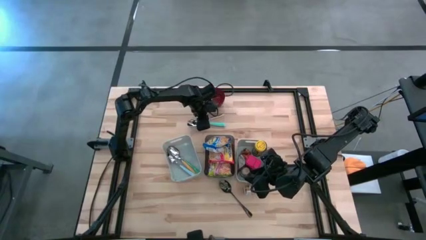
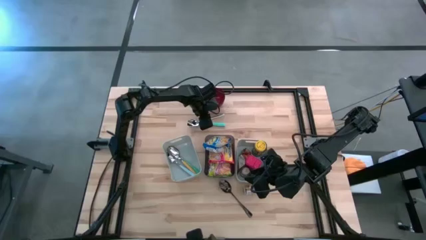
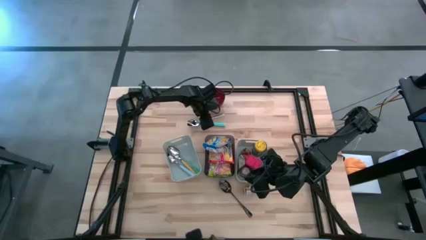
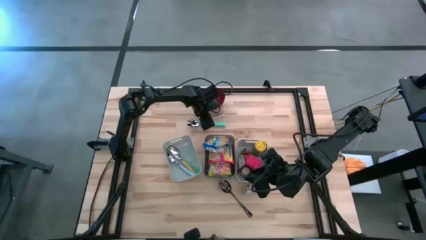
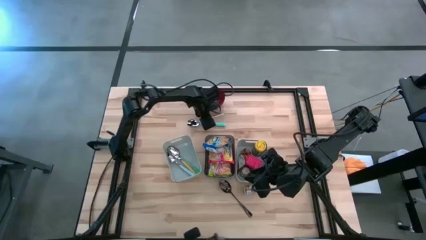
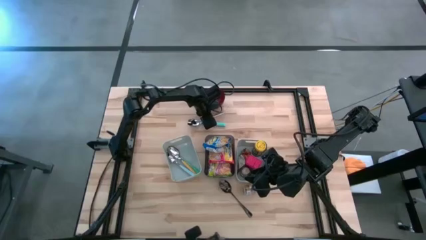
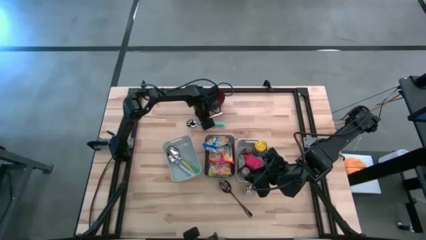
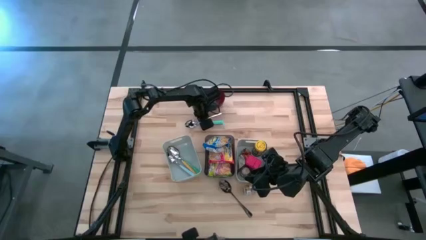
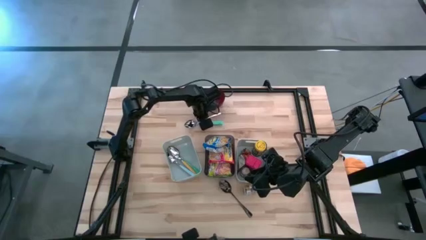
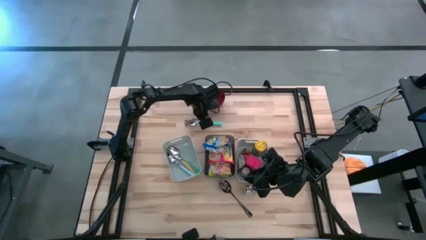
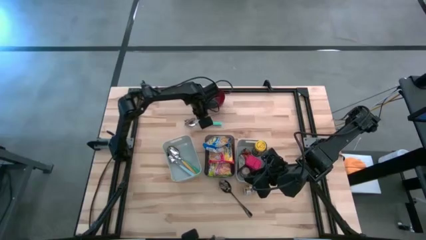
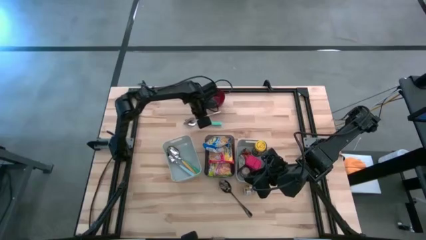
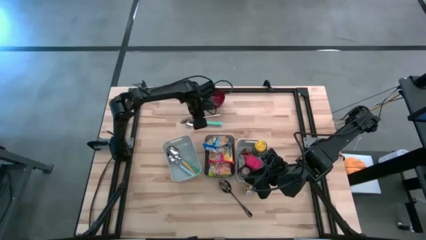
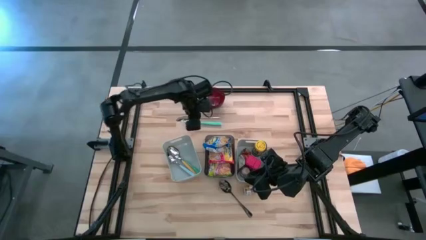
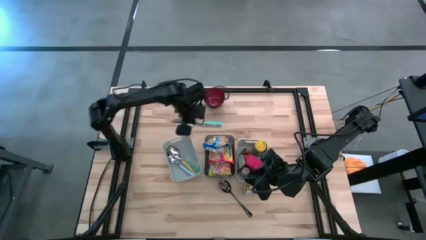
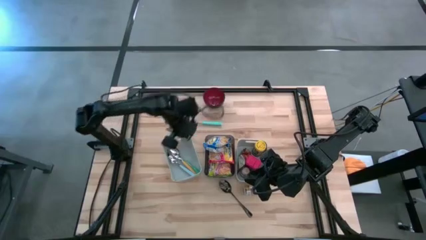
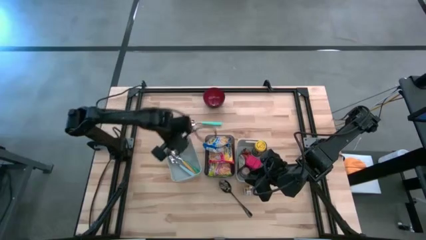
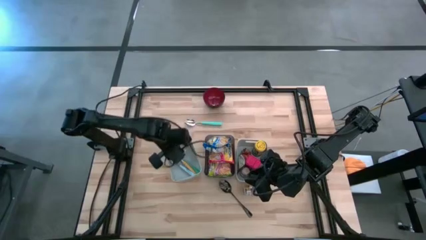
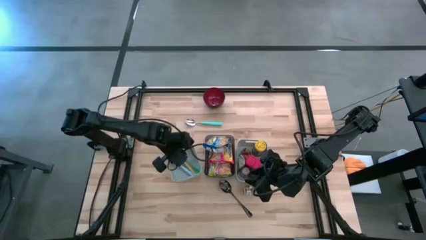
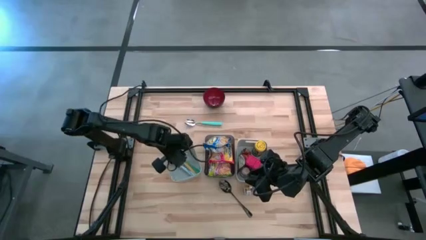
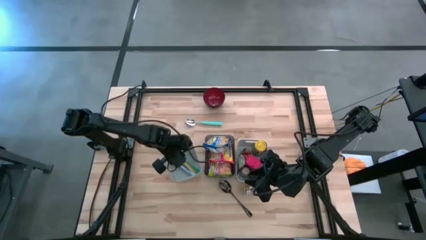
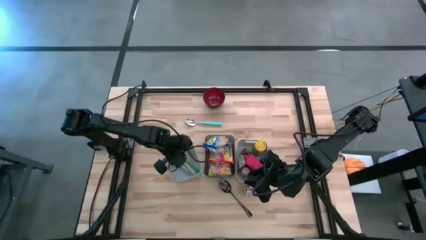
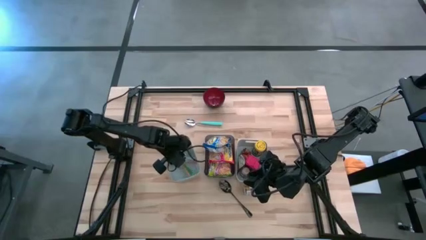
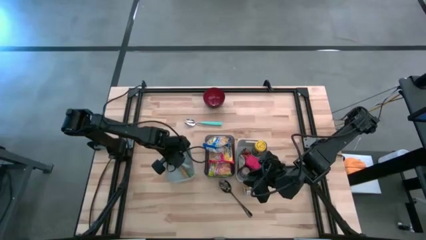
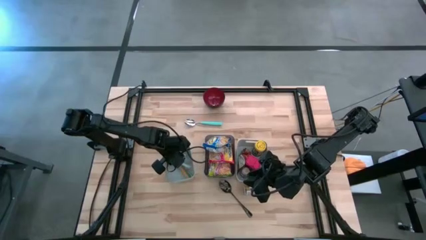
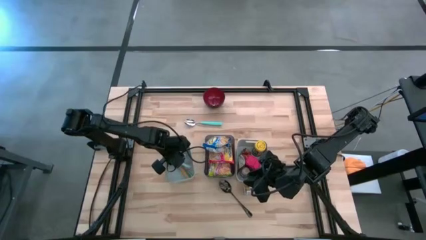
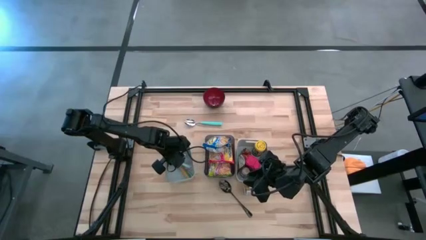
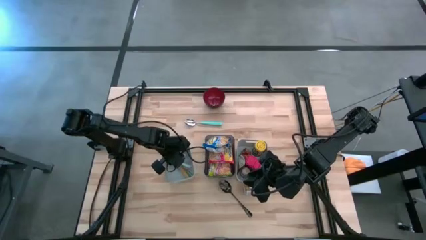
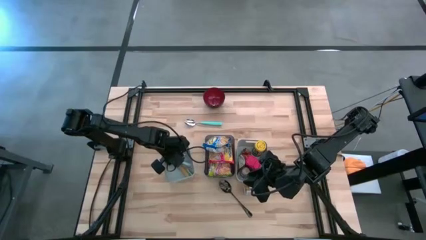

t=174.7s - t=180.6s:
Put the silver spoon into the left gray bin

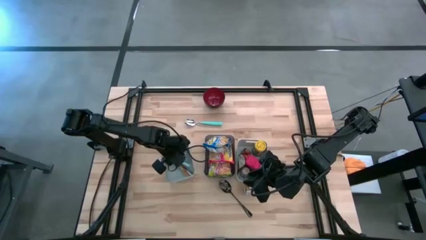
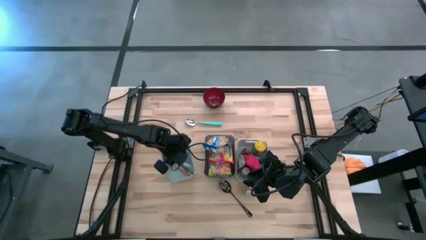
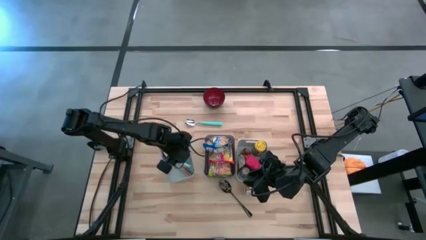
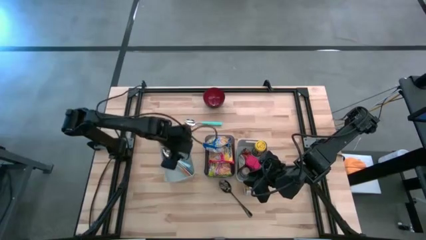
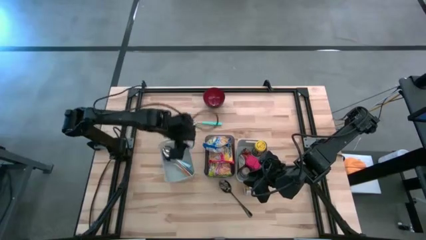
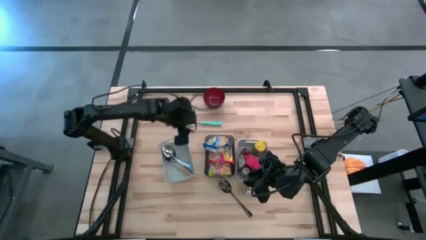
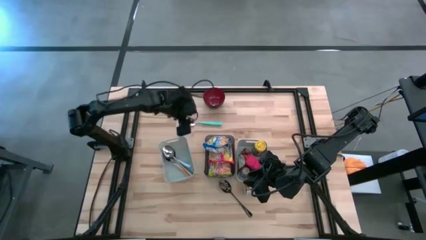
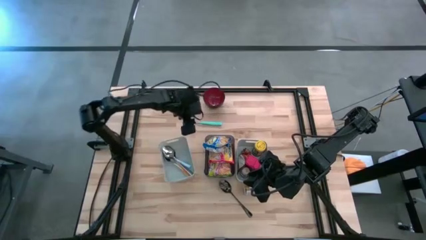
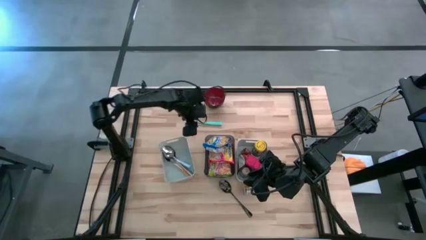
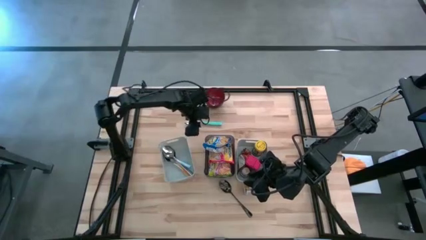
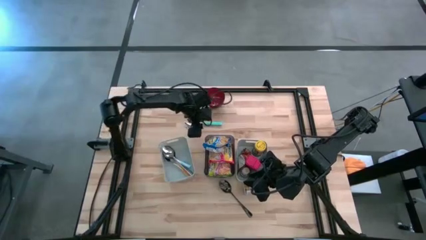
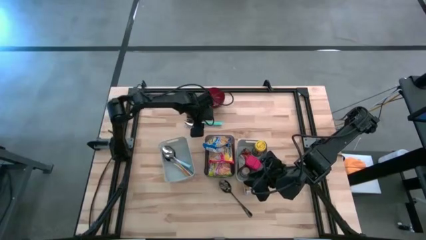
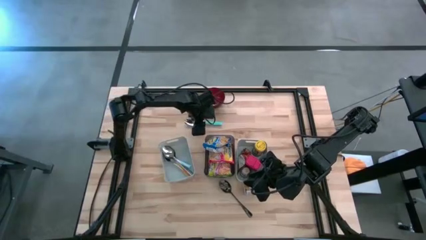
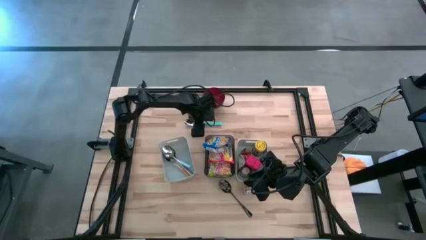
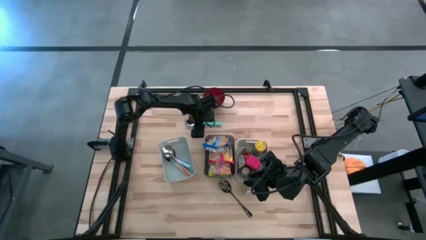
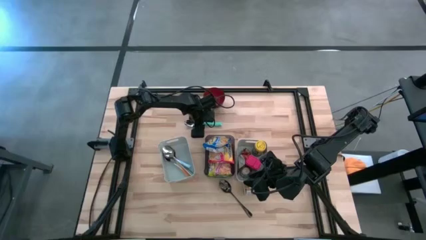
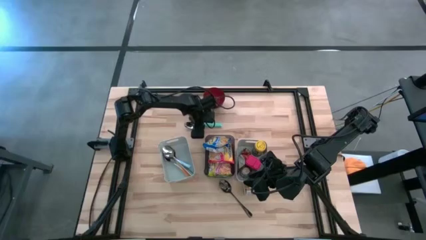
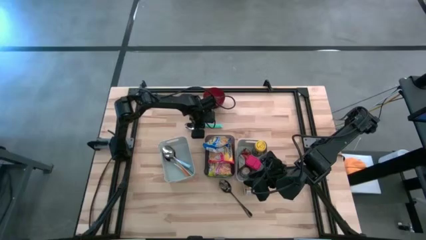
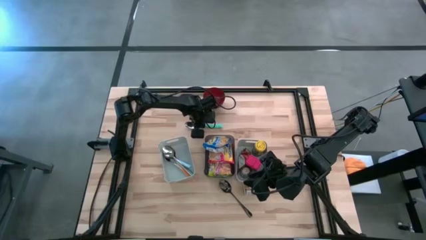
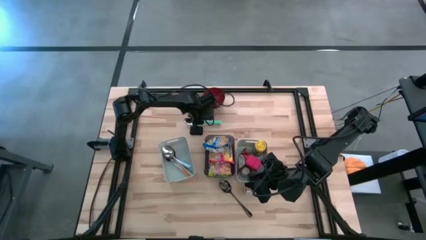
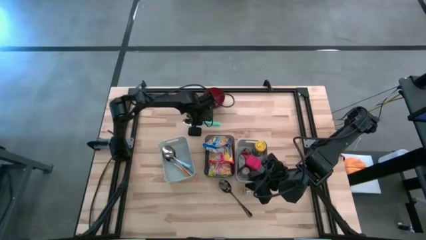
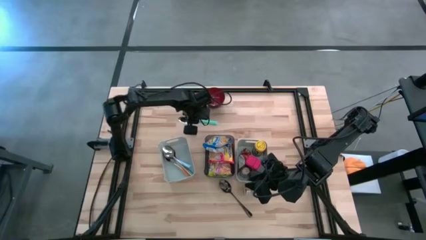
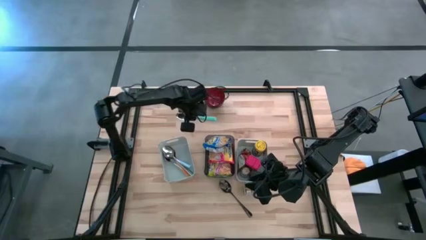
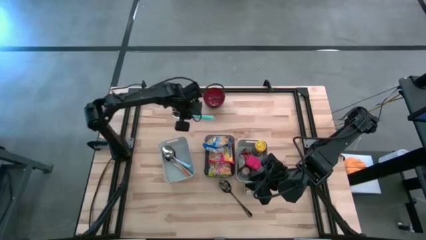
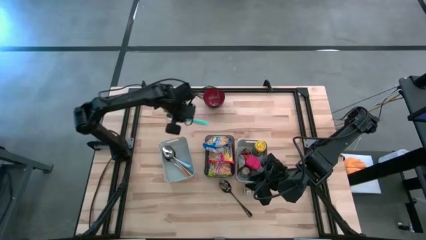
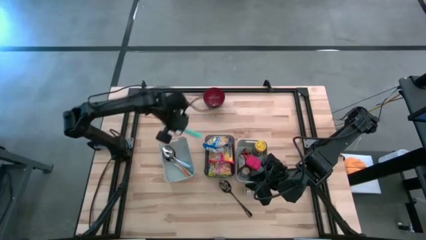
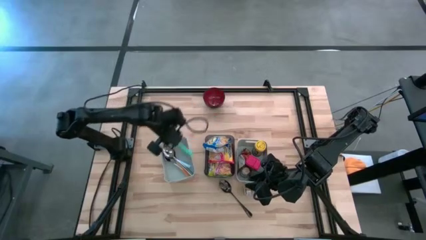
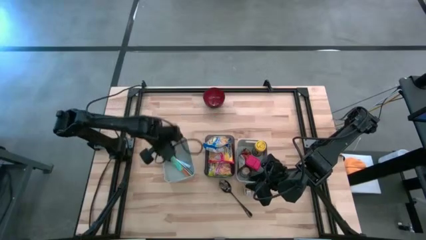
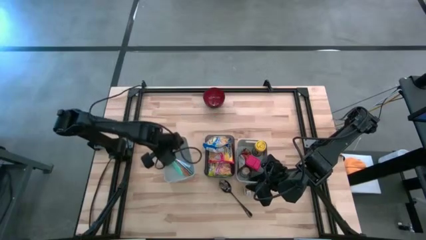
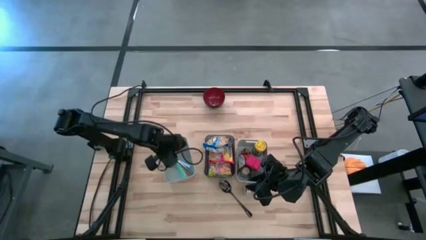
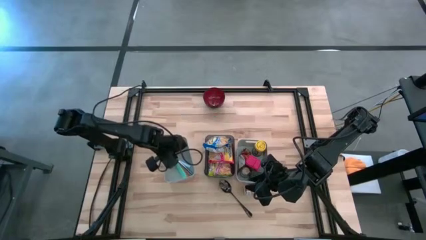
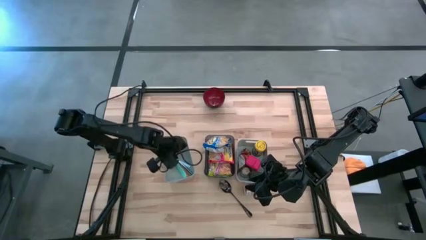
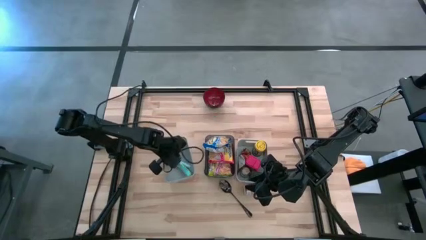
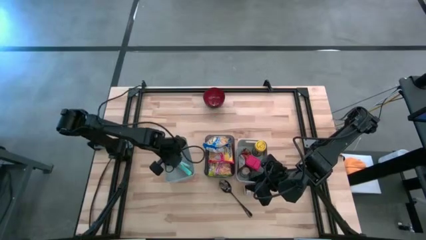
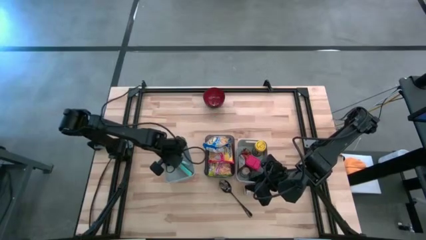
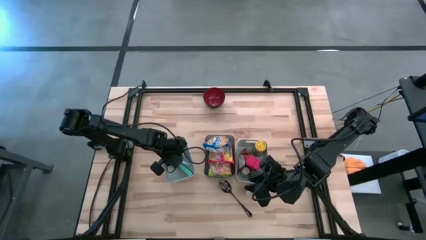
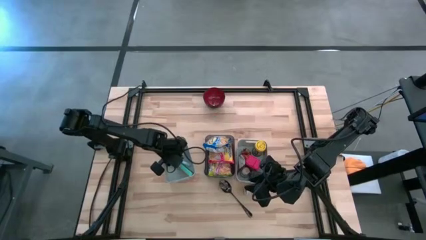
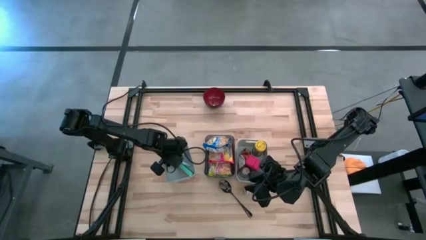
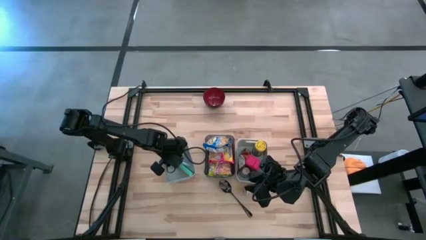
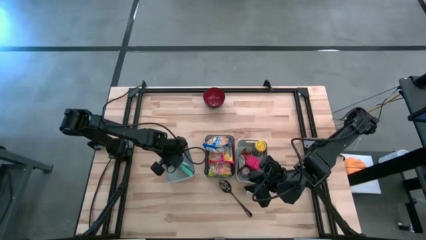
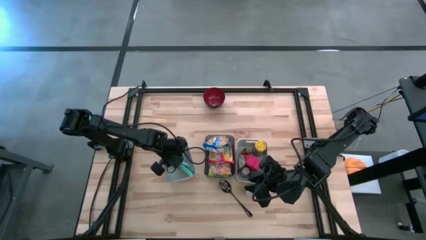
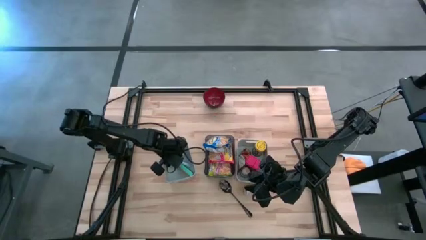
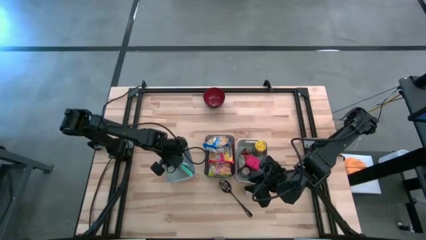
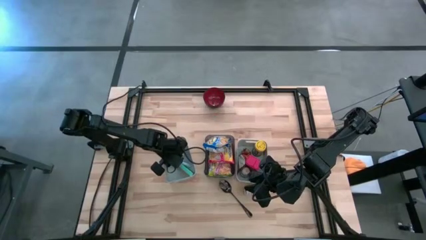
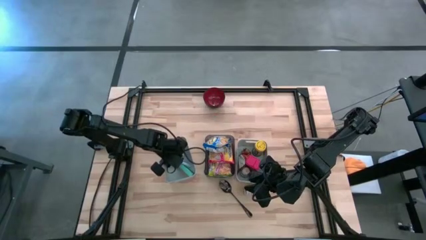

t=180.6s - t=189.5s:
Put the light green spoon into the left gray bin
